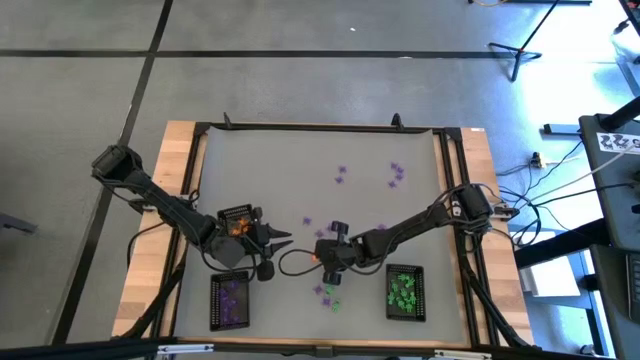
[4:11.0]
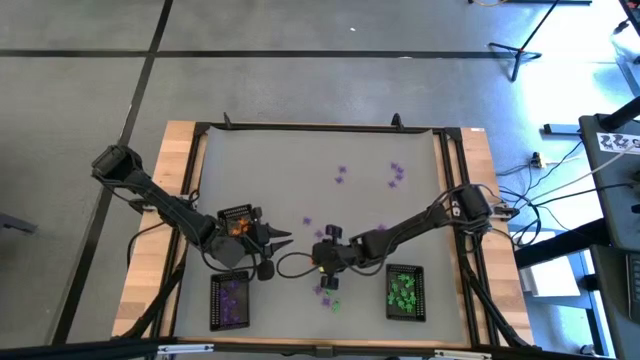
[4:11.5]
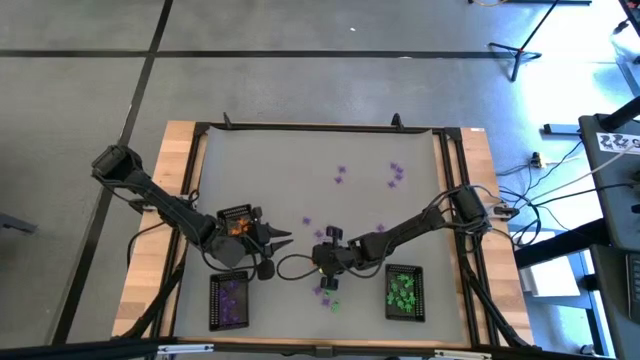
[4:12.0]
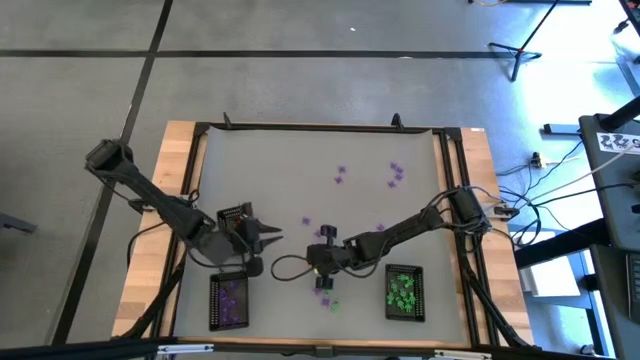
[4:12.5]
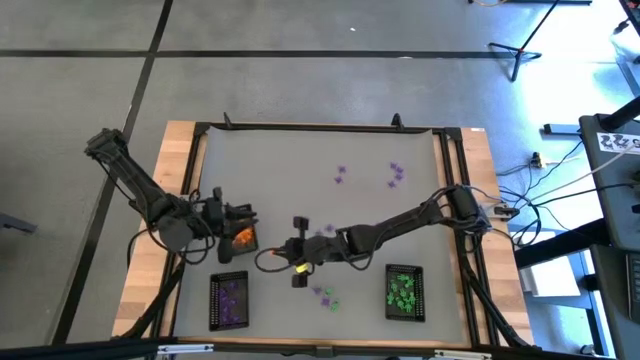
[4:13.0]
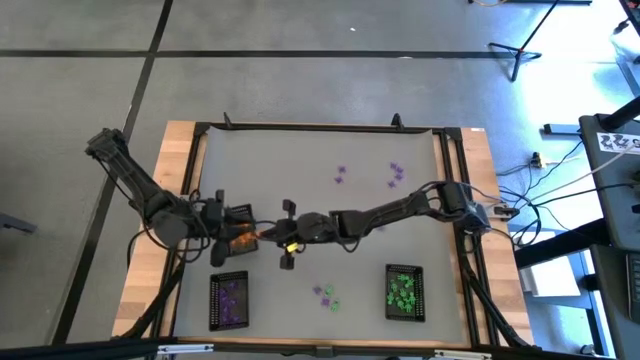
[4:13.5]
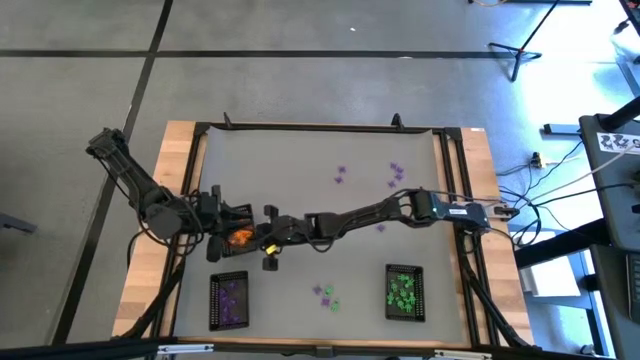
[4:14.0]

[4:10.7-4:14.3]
Task: Sort Halloween decoration
Put the orange spider toy into the top black basket

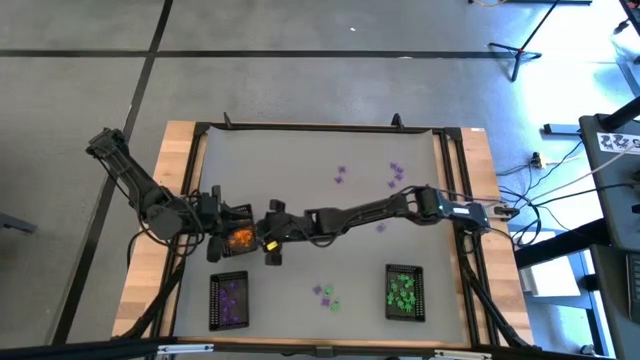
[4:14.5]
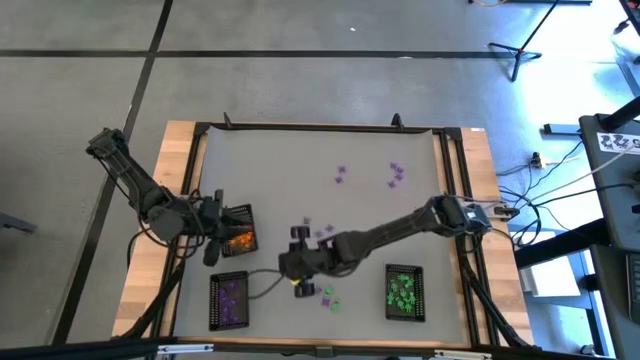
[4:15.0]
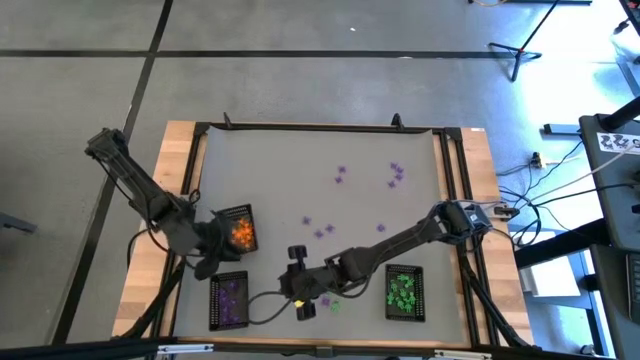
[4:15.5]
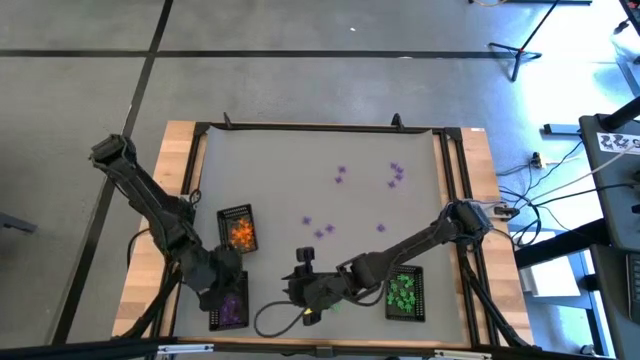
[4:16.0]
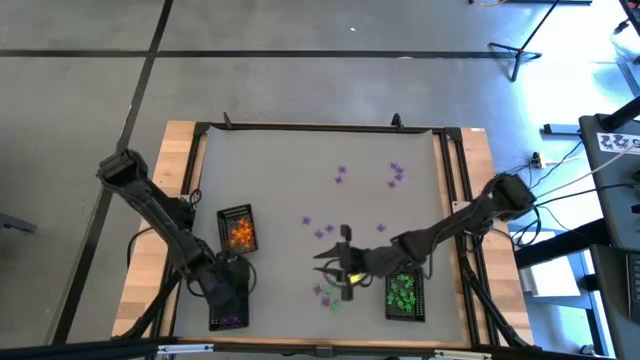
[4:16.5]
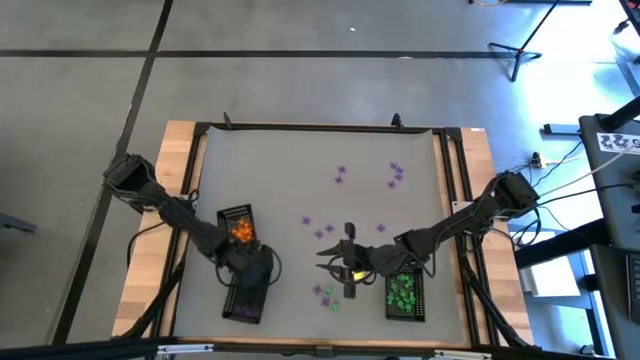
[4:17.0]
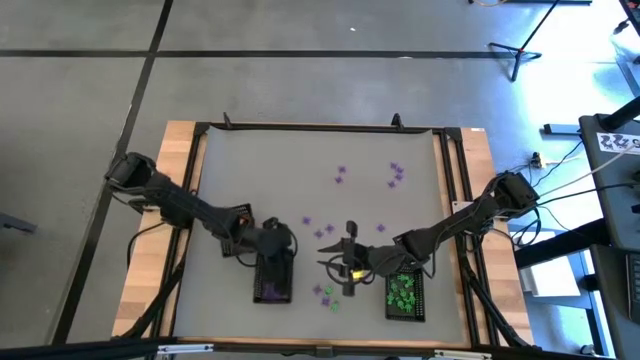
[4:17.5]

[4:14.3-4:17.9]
Move the bottom left black basket to the bottom center

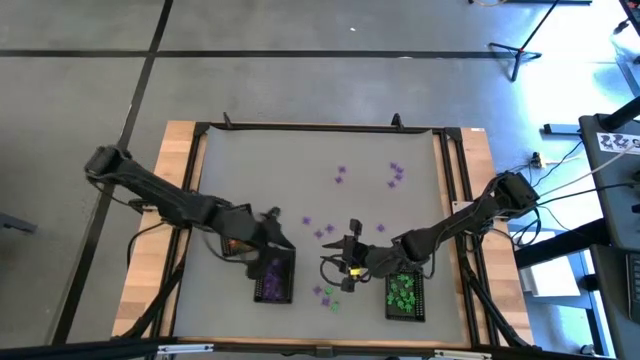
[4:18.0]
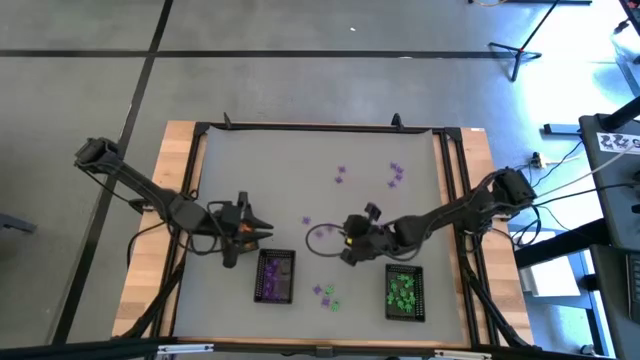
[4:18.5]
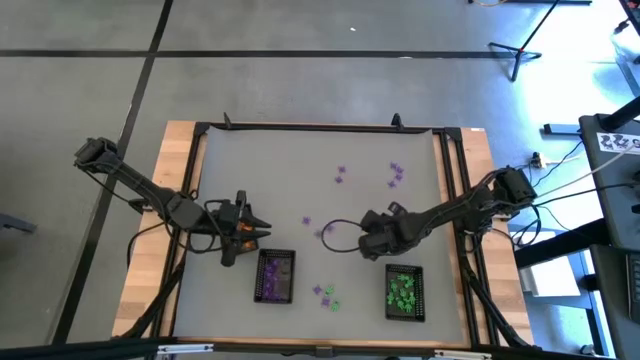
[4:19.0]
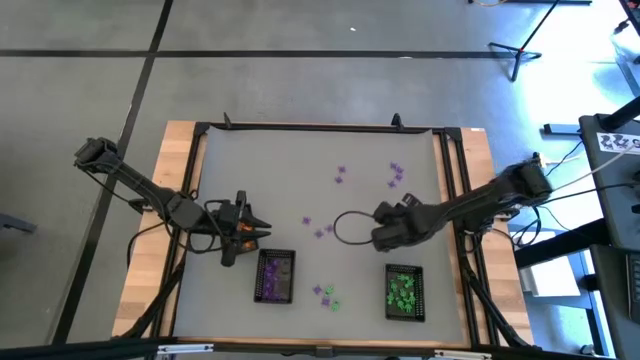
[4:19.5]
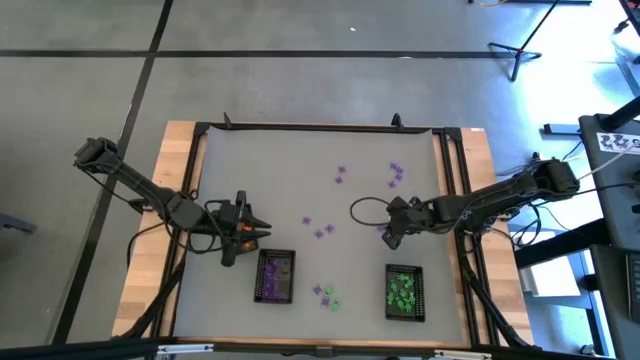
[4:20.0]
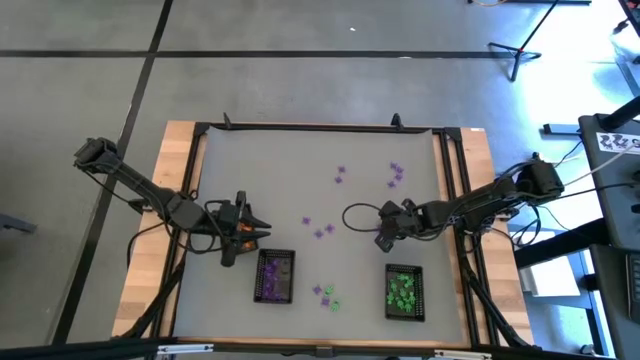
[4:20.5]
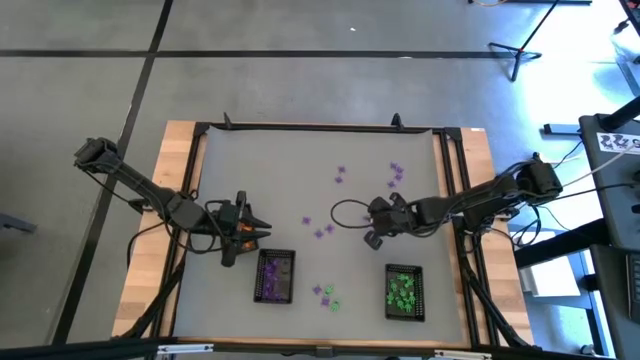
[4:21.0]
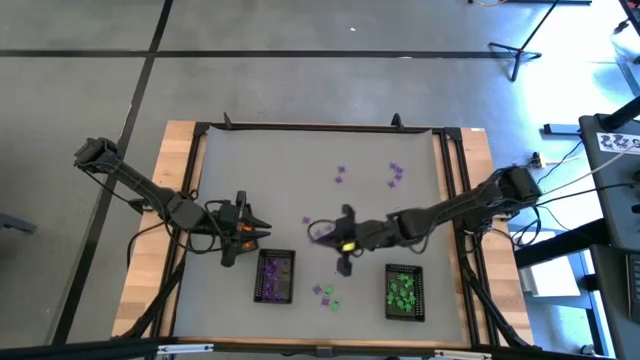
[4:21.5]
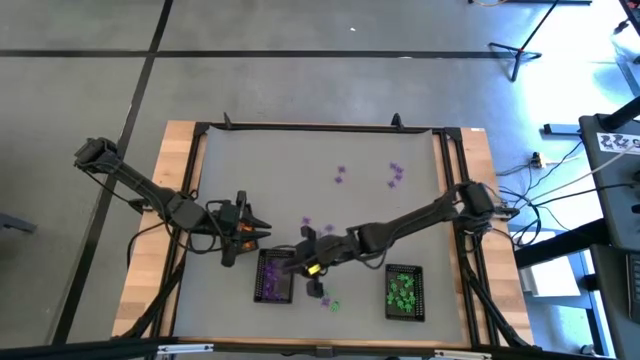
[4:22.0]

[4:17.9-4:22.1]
Put the purple spider toy into the bottom left black basket

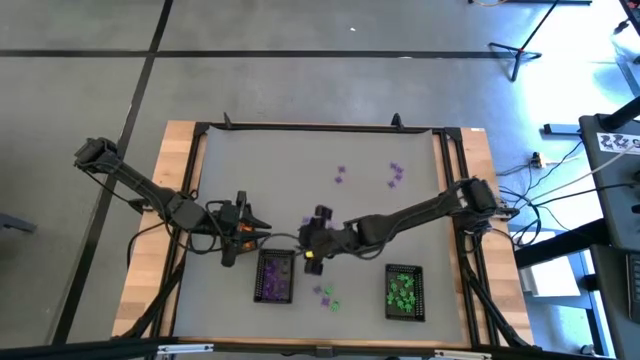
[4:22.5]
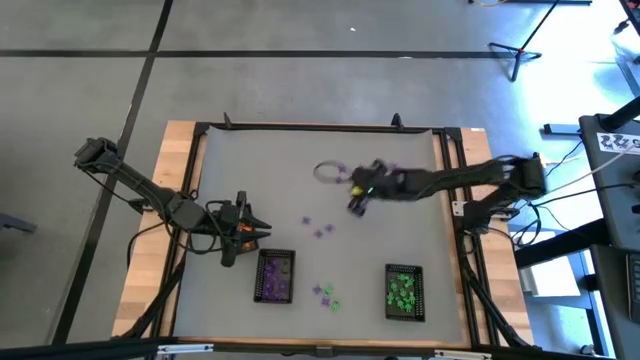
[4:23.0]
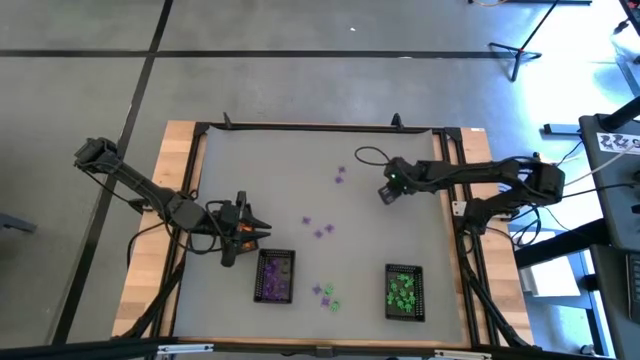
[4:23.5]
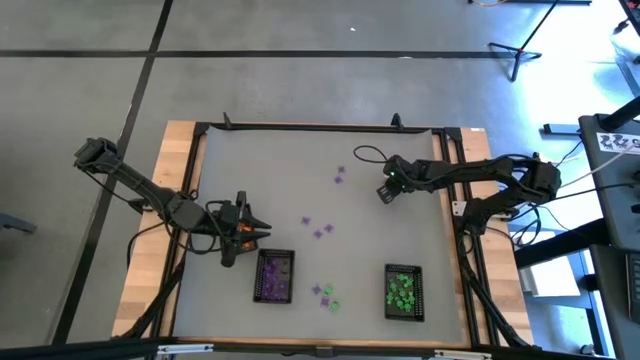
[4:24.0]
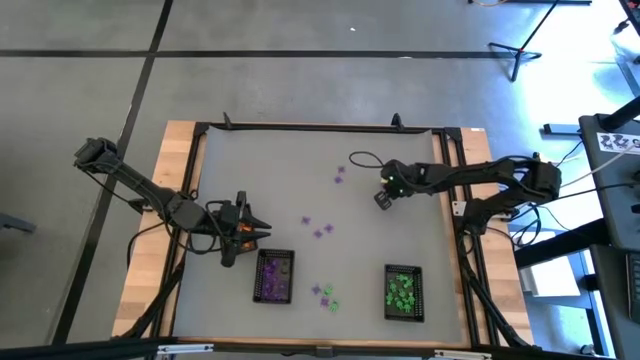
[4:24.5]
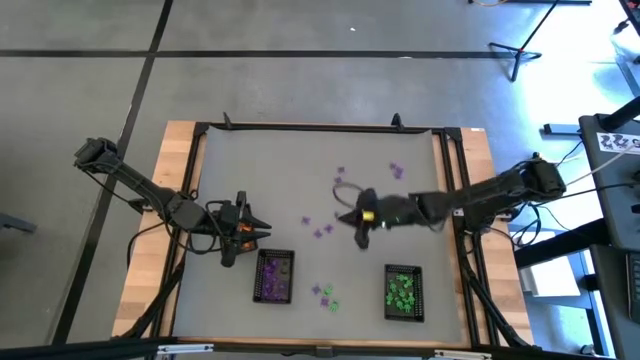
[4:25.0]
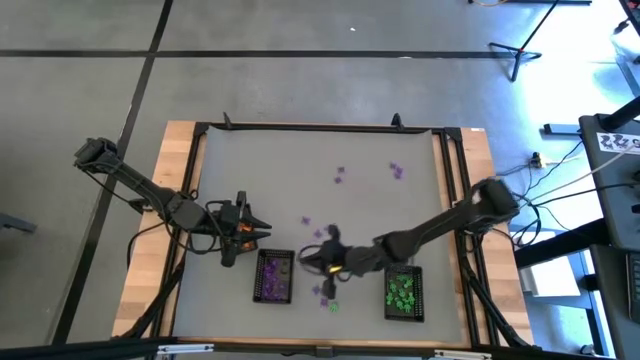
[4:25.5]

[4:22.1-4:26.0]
Put the purple spider toy into the bottom left black basket

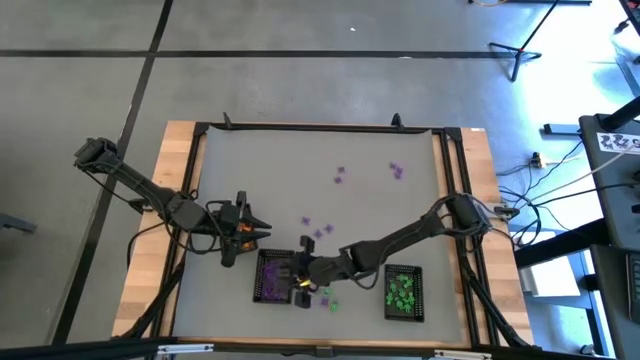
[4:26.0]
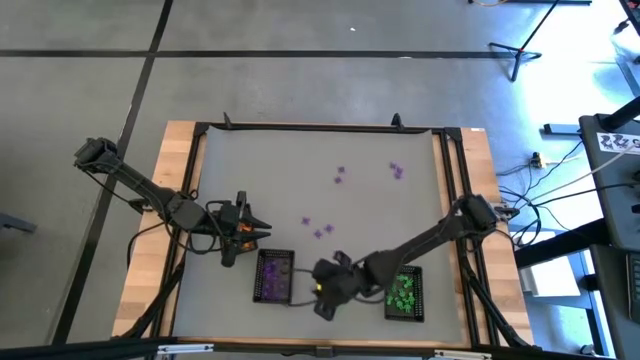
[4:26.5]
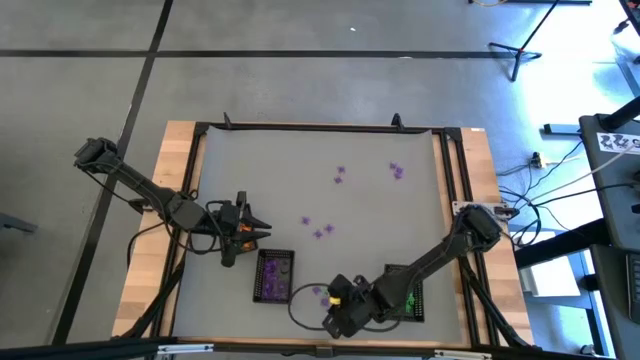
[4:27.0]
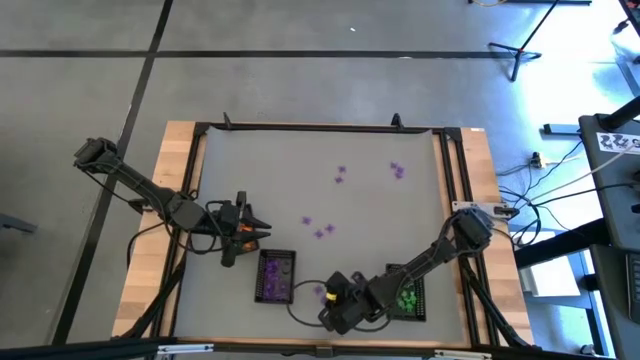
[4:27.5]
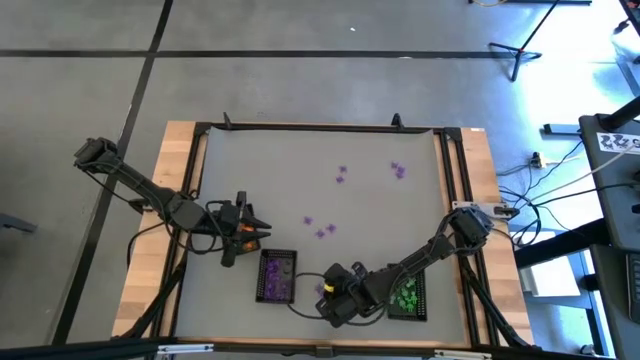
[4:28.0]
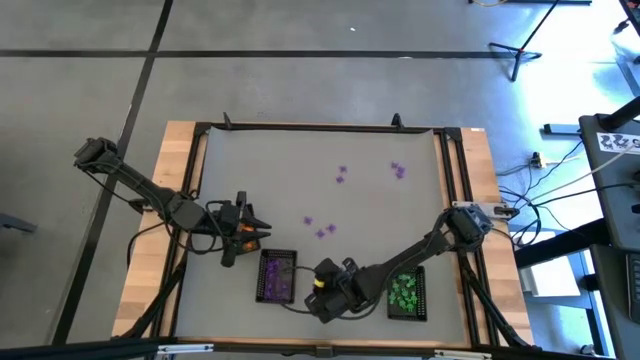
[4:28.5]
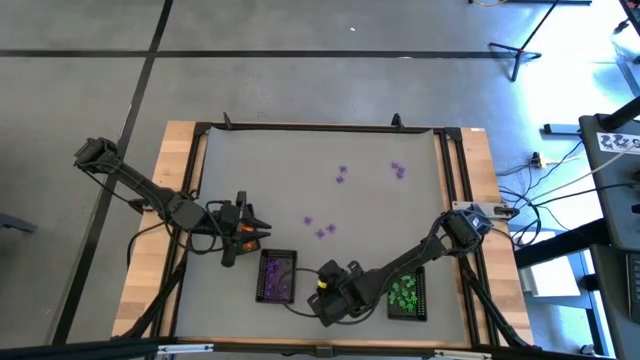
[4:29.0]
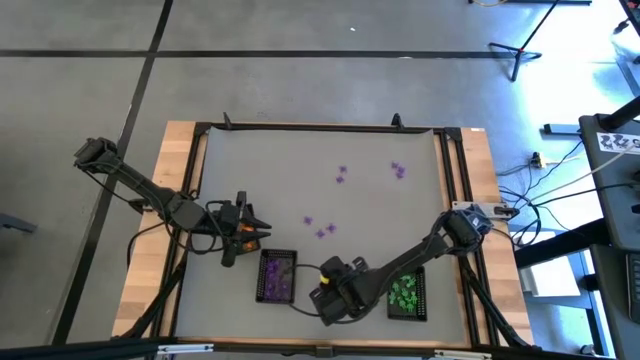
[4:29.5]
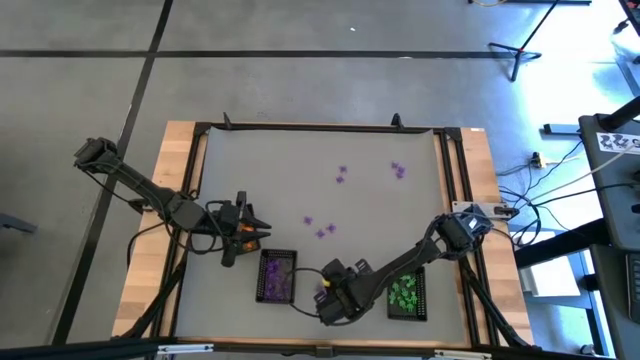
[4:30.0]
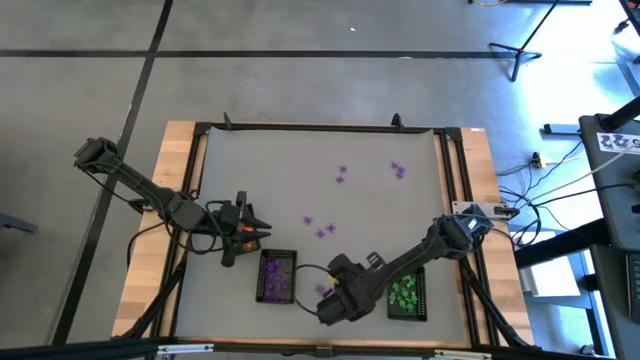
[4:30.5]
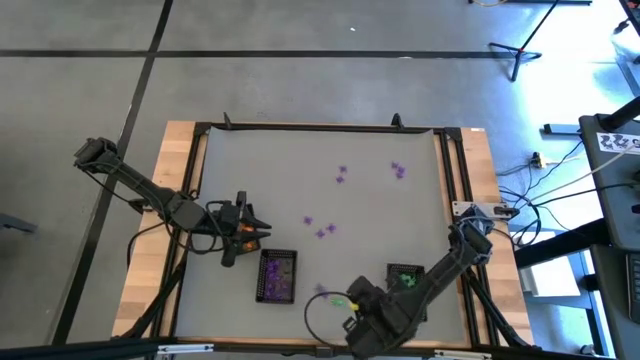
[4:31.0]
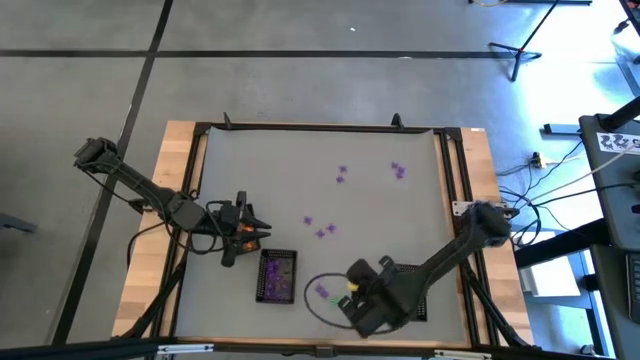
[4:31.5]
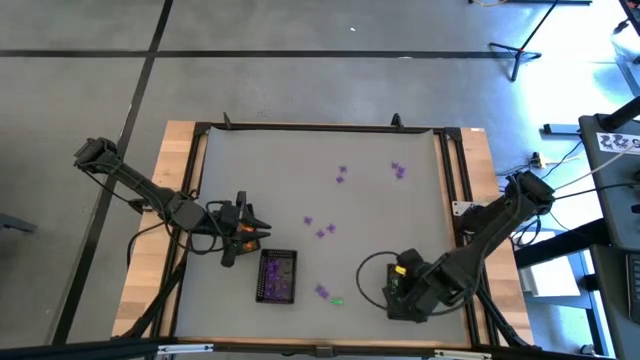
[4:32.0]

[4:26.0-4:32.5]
Put the green skeleton toy into the bottom right black basket
